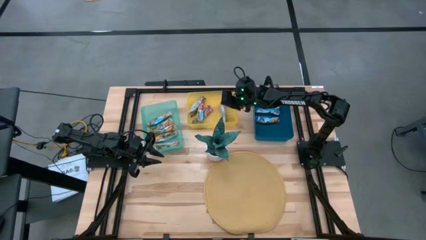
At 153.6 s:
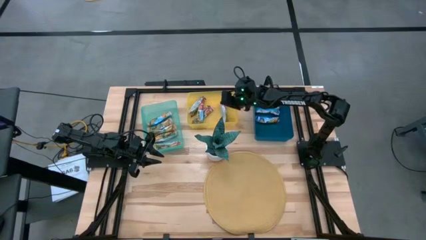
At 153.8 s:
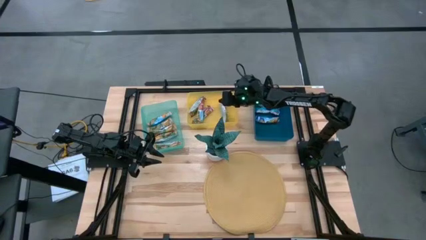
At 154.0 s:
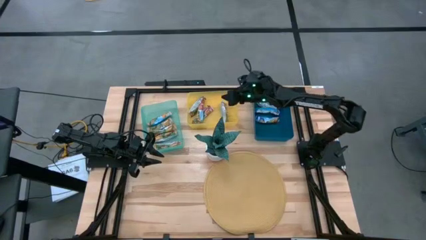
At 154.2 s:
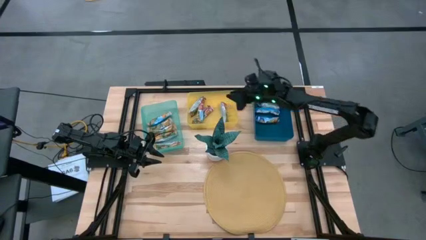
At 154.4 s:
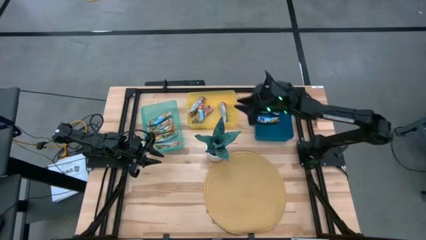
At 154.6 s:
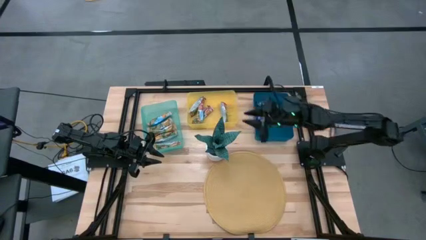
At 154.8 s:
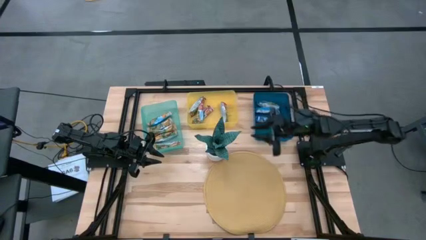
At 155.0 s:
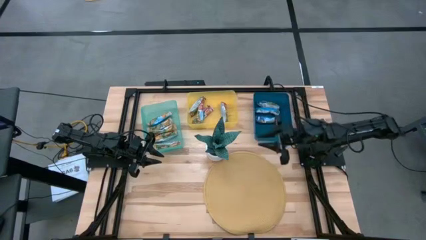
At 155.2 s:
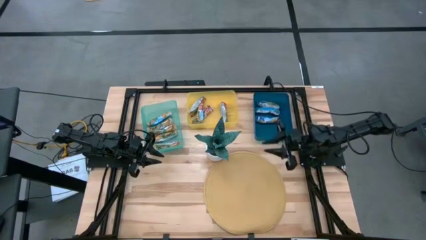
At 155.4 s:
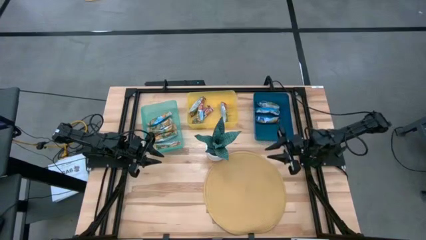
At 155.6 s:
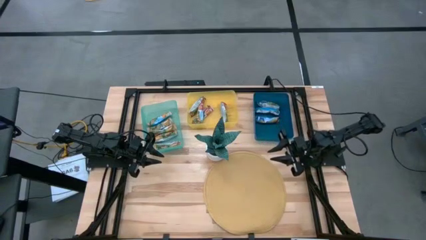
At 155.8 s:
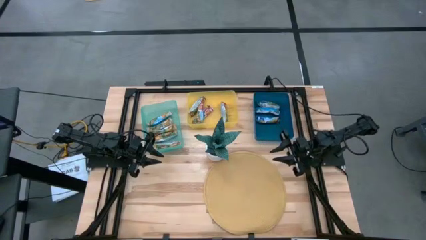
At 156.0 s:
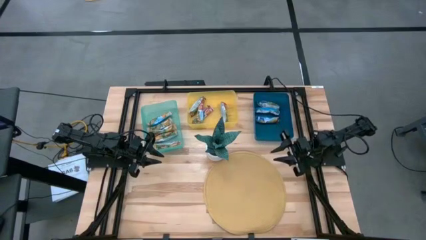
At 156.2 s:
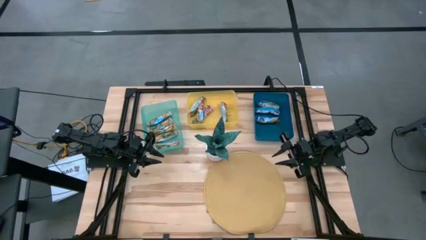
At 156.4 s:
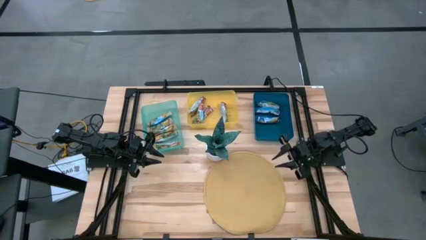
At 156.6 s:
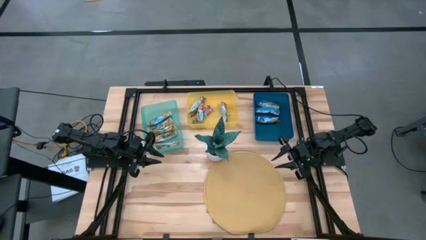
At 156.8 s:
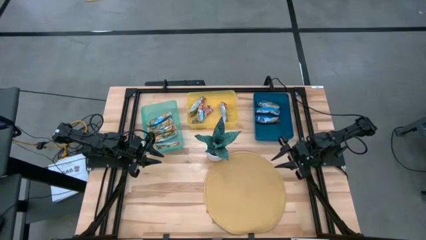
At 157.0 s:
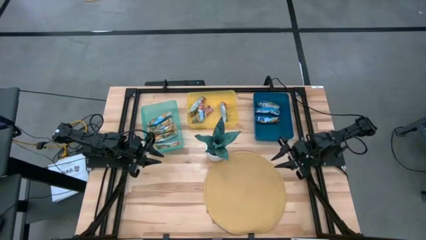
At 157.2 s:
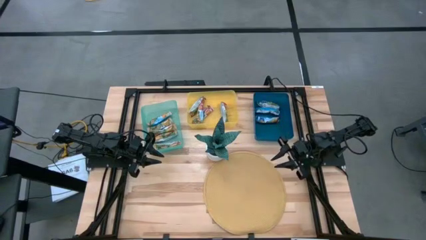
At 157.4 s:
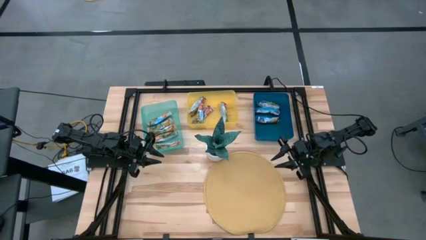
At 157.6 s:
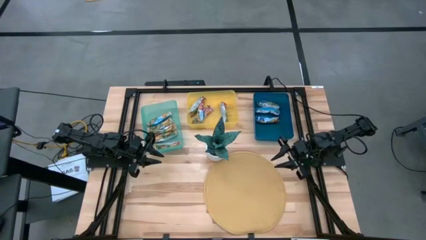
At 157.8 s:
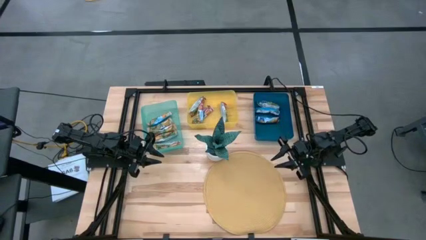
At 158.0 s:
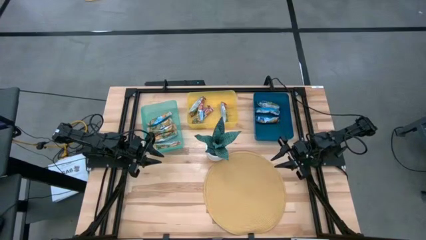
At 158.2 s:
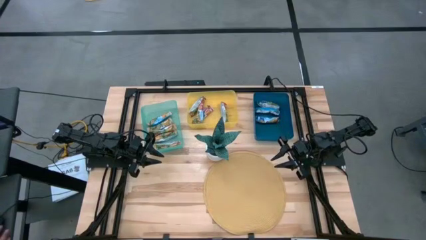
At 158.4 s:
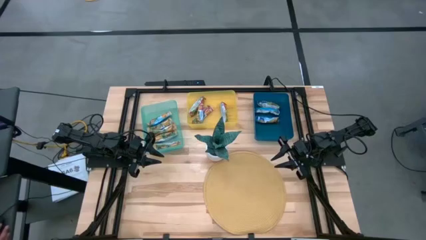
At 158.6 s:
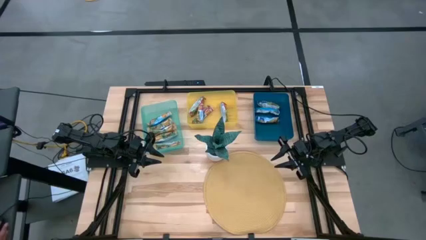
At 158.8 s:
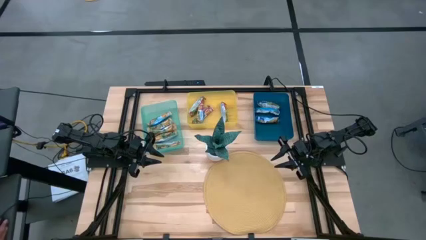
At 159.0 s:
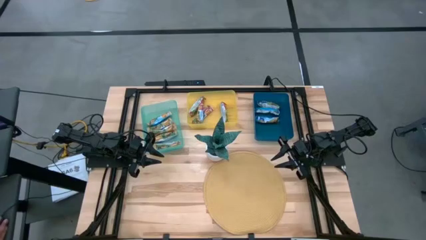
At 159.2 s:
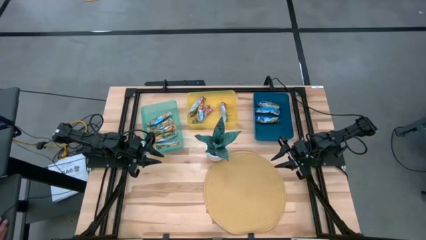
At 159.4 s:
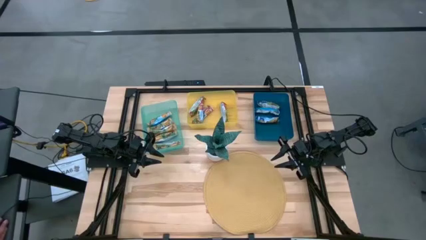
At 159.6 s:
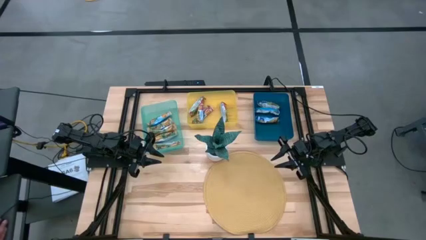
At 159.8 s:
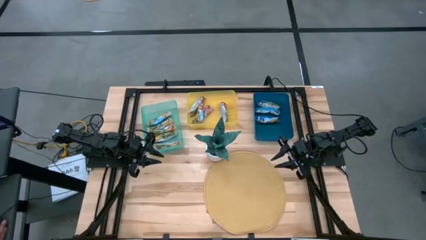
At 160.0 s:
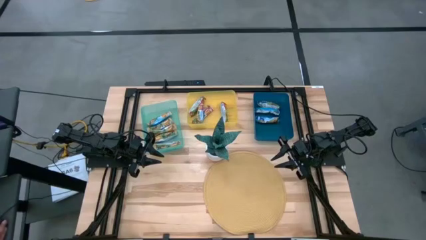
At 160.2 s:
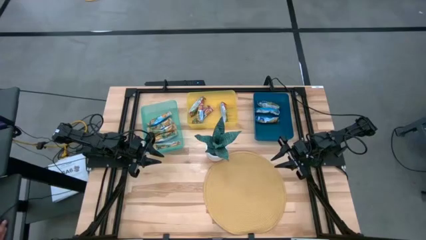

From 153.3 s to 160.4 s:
Task: Pick and place Granola Bars by type
Return to Home Position

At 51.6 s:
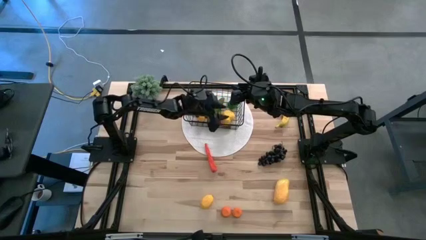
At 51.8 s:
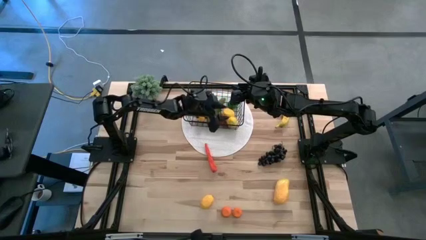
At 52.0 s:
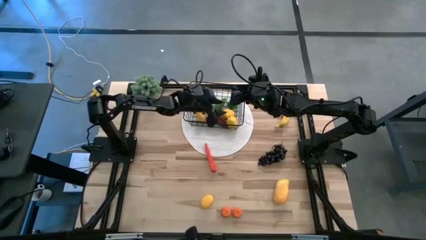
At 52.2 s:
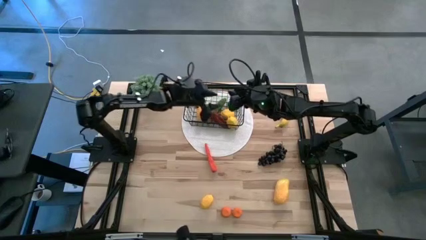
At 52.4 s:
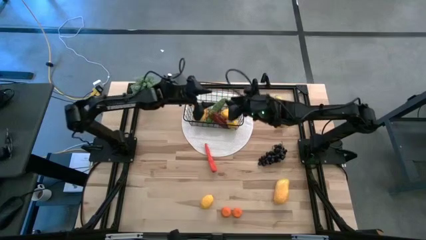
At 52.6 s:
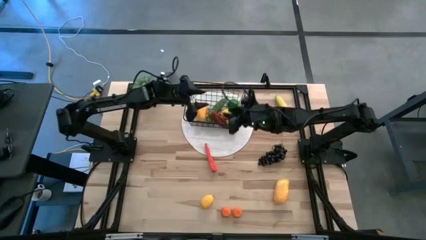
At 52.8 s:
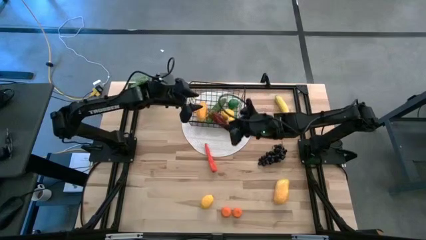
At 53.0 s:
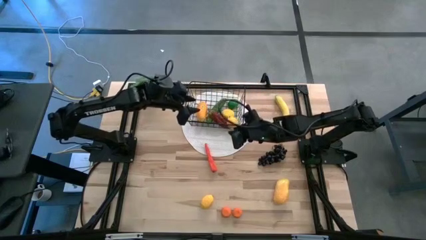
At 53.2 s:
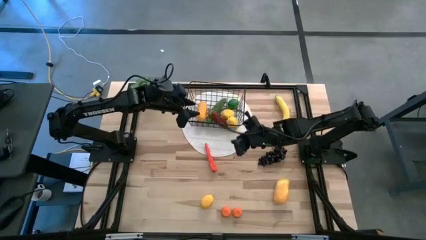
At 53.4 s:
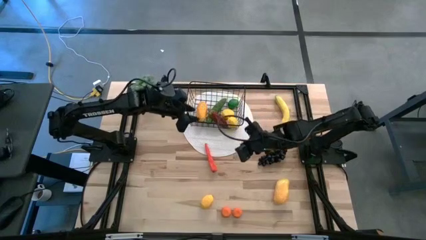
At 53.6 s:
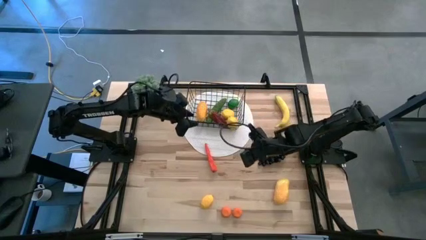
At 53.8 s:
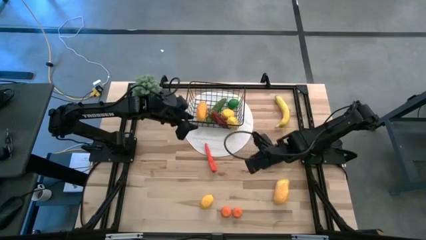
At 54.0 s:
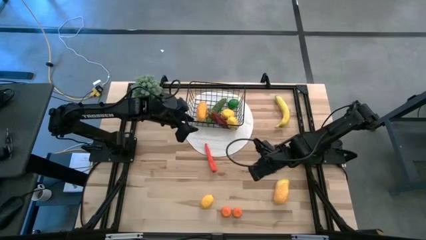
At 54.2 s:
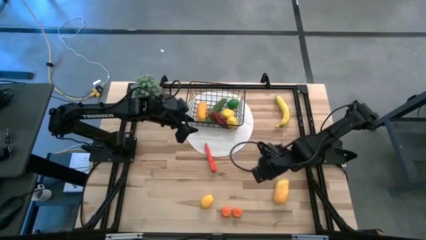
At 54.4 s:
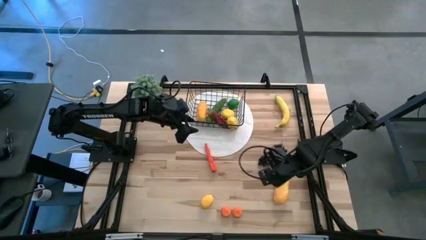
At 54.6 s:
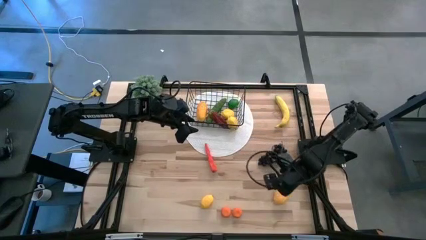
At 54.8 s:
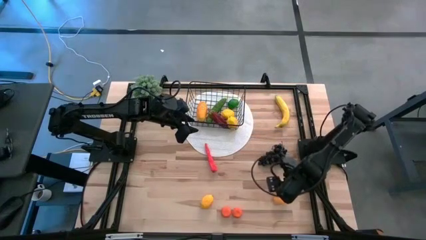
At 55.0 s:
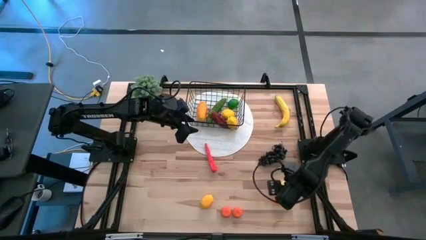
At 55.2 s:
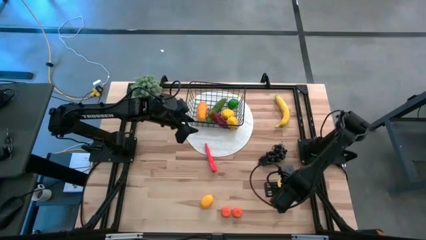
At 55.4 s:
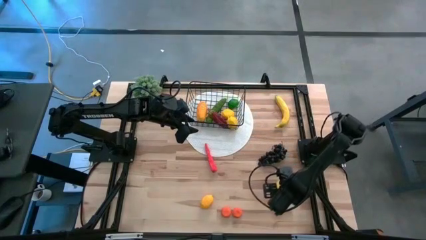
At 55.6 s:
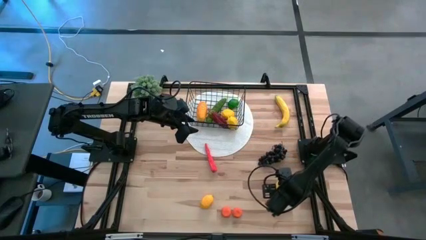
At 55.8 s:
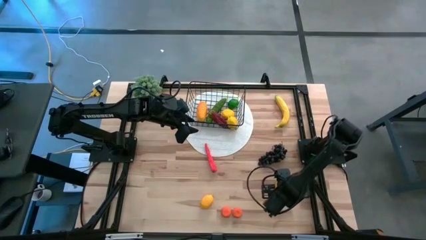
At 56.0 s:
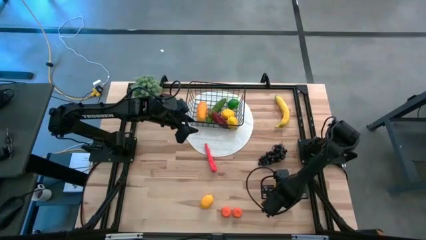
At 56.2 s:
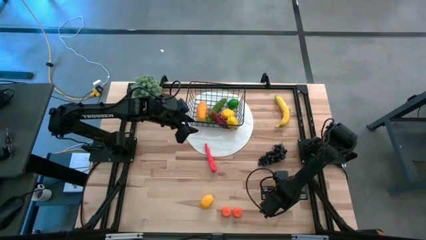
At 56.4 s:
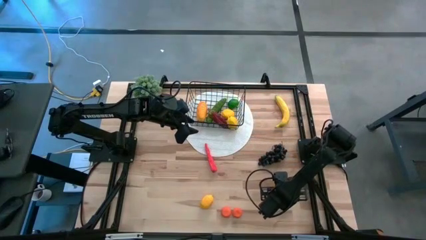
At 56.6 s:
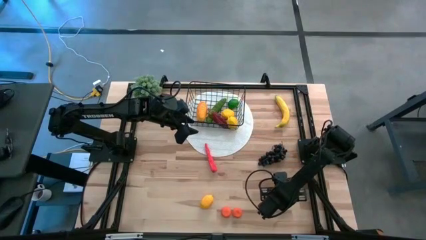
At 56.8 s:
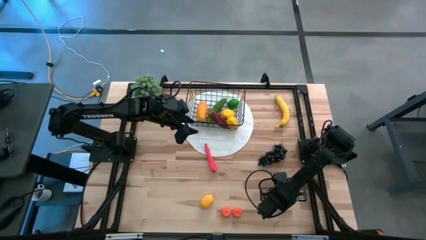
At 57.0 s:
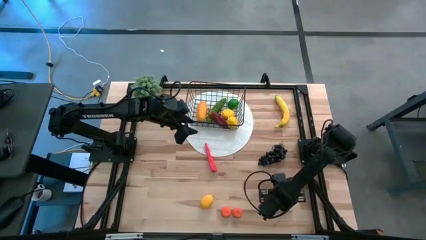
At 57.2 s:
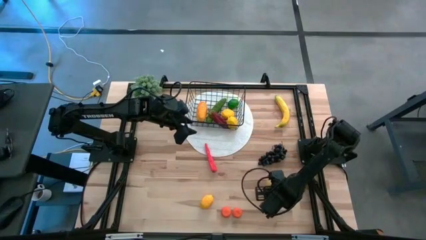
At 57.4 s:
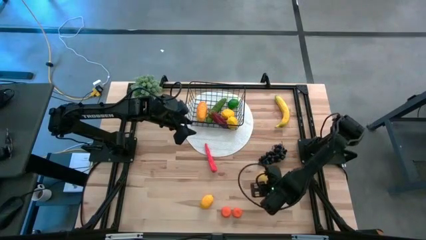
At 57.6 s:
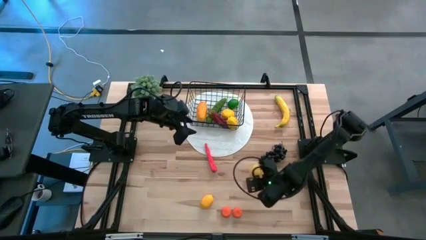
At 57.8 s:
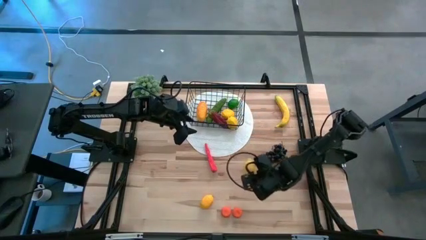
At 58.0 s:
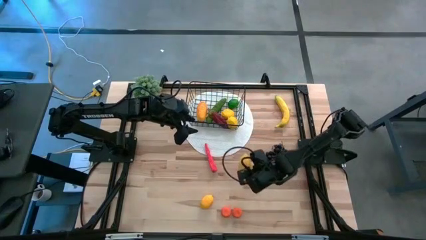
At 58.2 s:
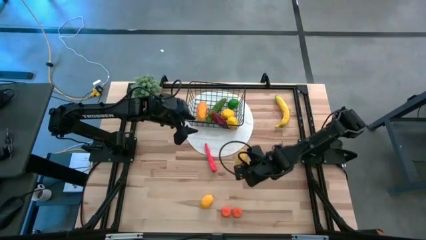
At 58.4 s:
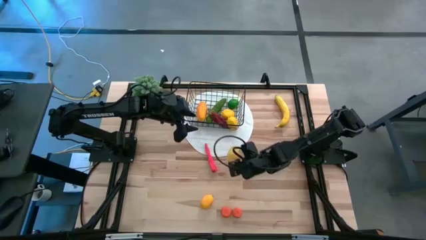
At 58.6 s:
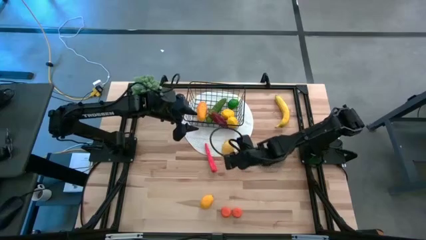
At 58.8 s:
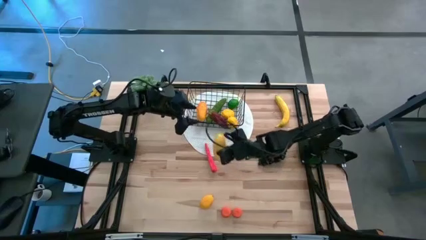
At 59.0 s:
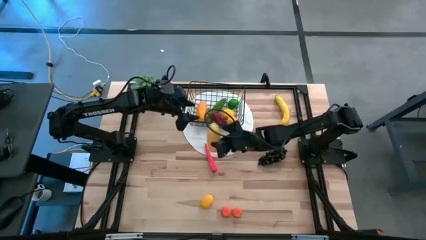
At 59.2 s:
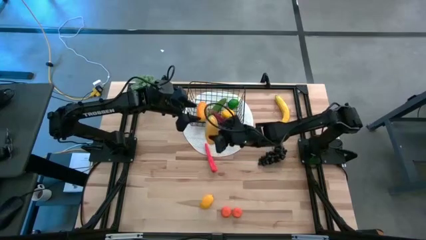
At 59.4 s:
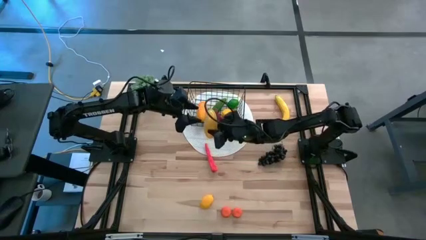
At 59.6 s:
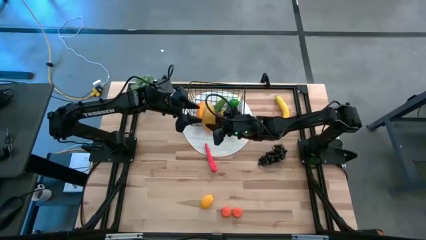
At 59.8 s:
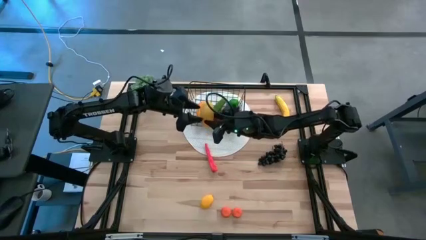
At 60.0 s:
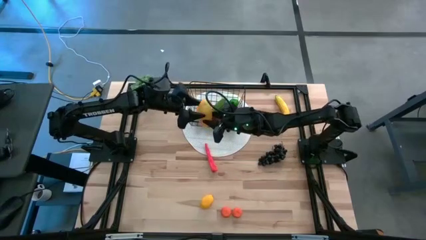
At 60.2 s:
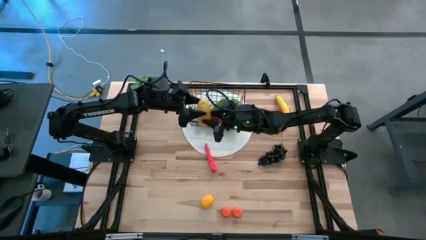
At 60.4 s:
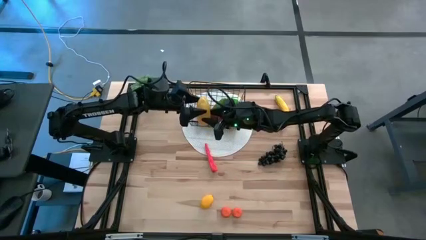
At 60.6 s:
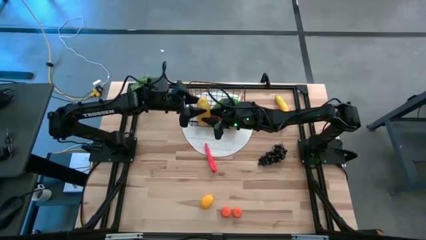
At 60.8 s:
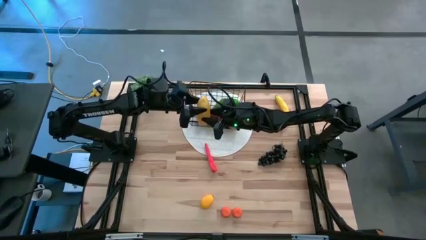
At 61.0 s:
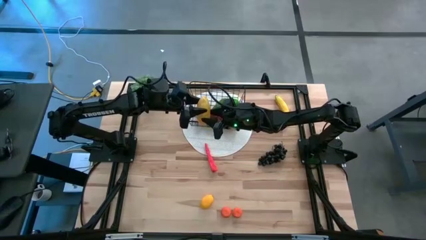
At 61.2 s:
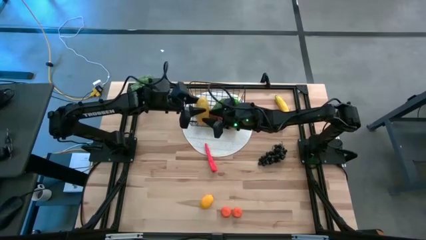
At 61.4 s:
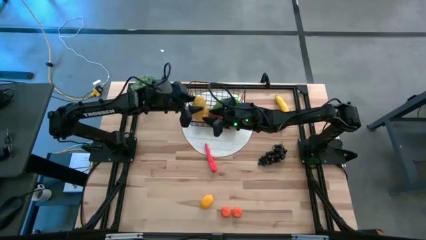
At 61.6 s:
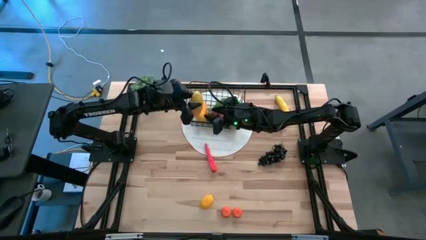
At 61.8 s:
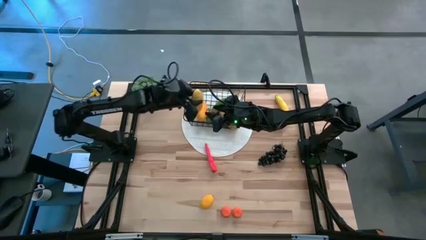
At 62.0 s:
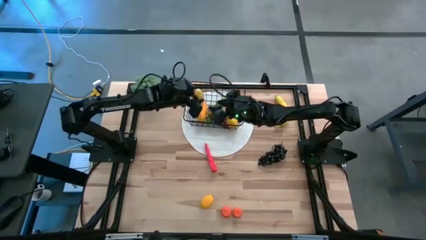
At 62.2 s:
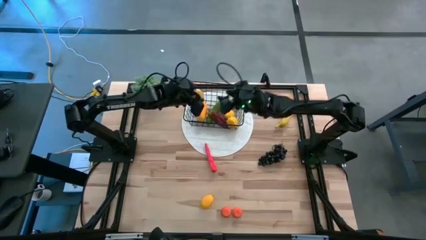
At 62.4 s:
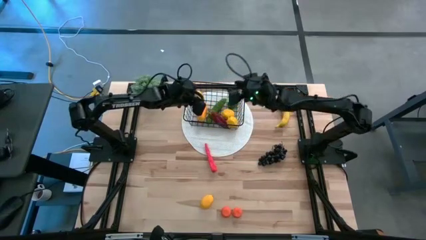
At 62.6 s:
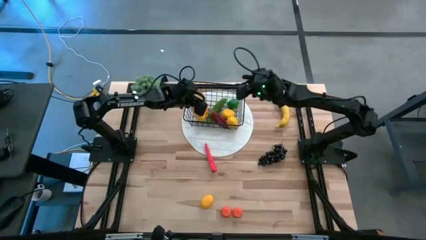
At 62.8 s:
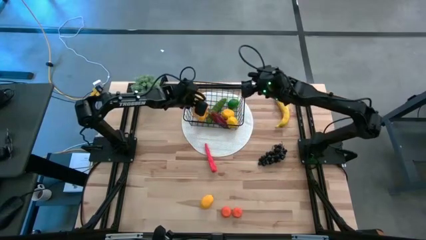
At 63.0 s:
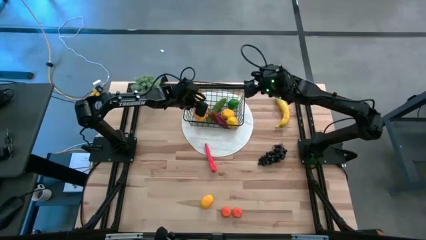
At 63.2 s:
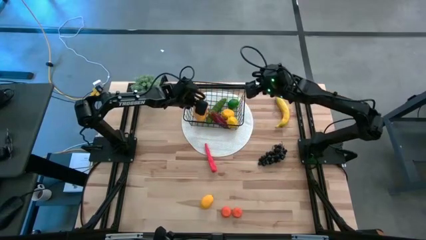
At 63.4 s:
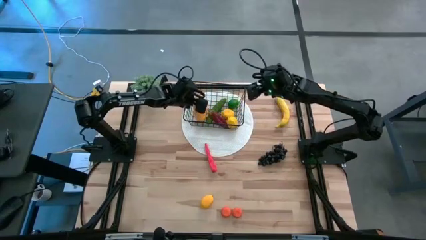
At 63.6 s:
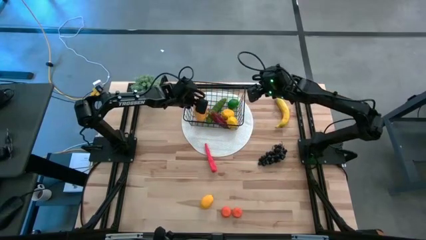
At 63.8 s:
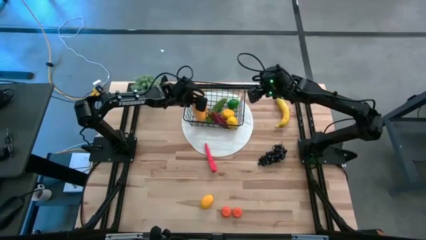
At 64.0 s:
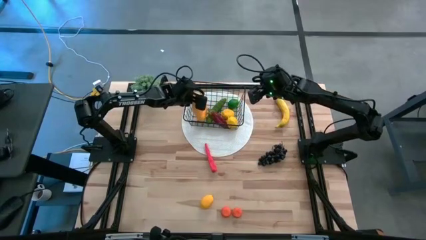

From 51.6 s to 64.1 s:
Task: Build produce basket
Put the mango into the wire basket
